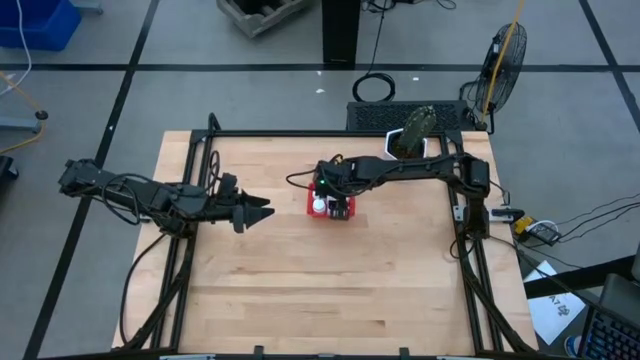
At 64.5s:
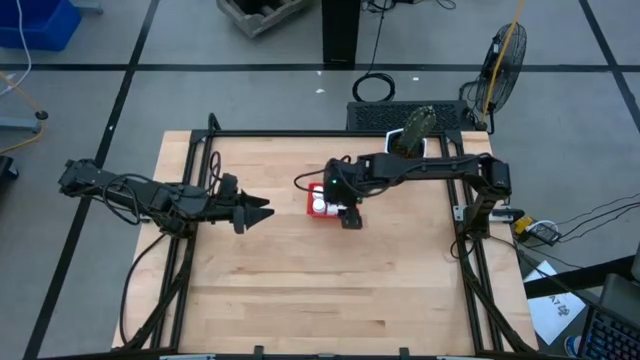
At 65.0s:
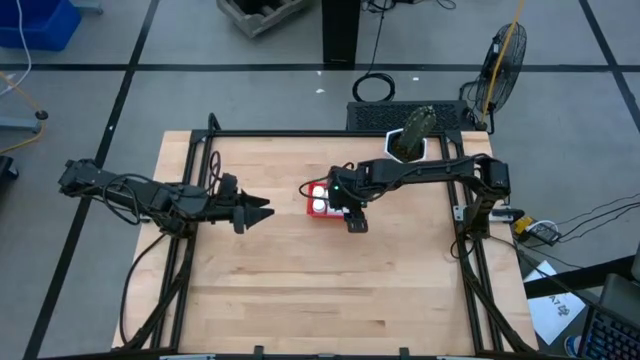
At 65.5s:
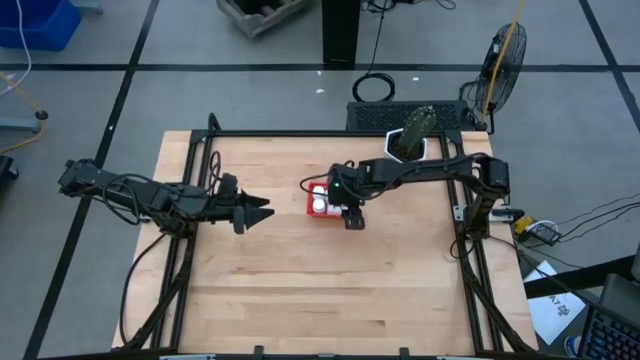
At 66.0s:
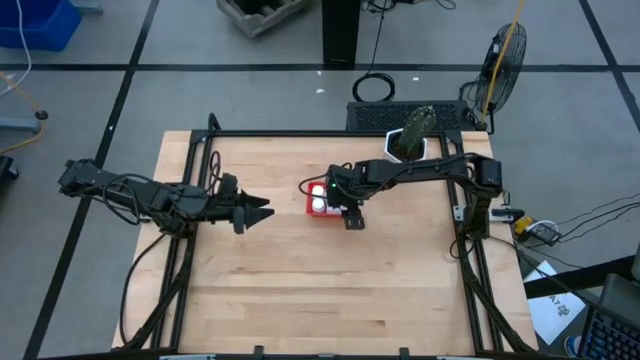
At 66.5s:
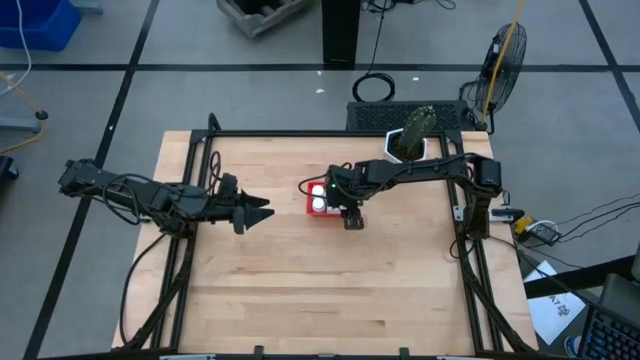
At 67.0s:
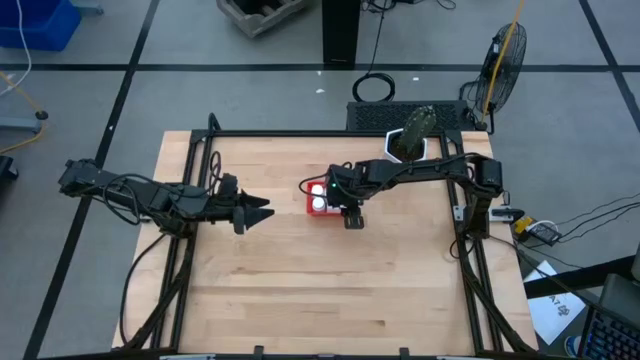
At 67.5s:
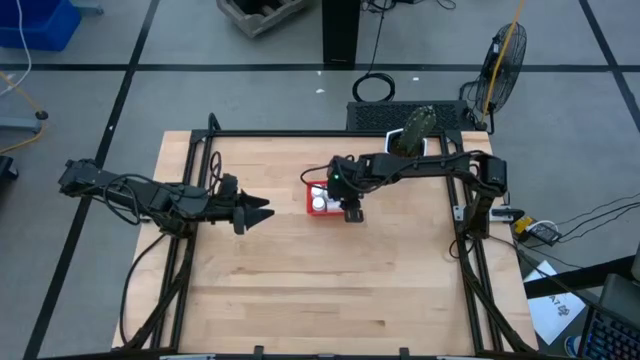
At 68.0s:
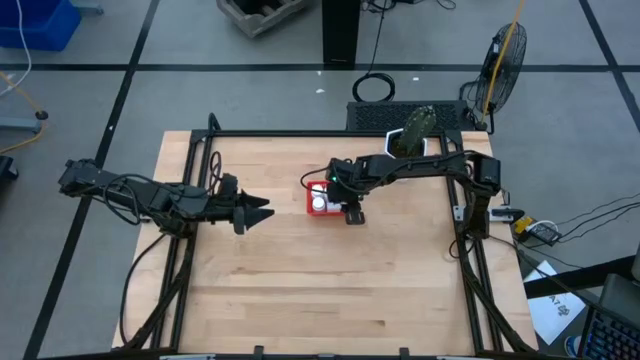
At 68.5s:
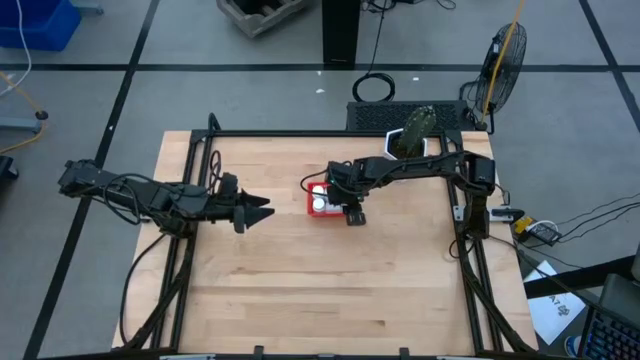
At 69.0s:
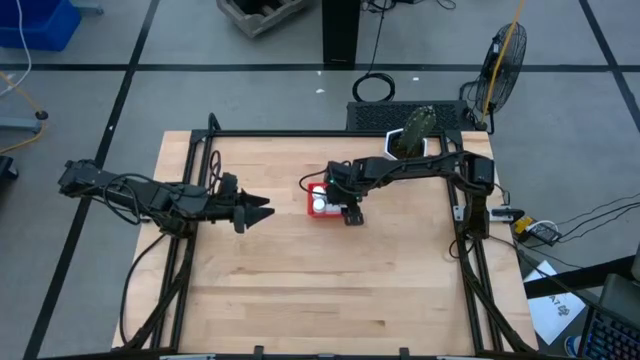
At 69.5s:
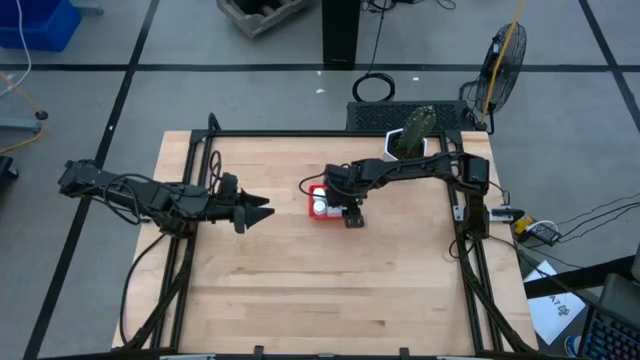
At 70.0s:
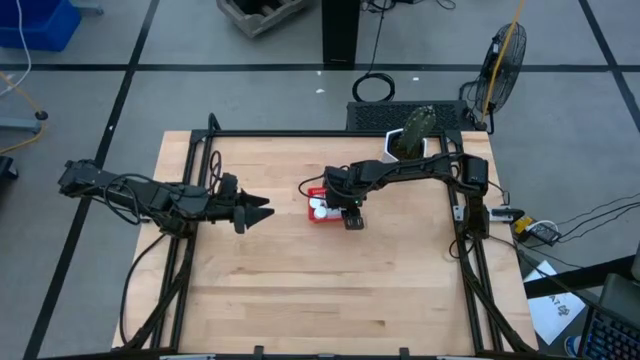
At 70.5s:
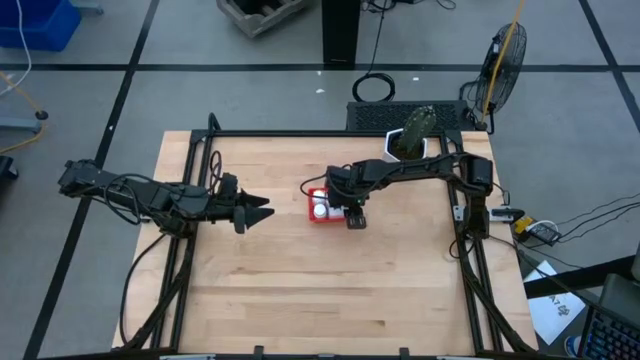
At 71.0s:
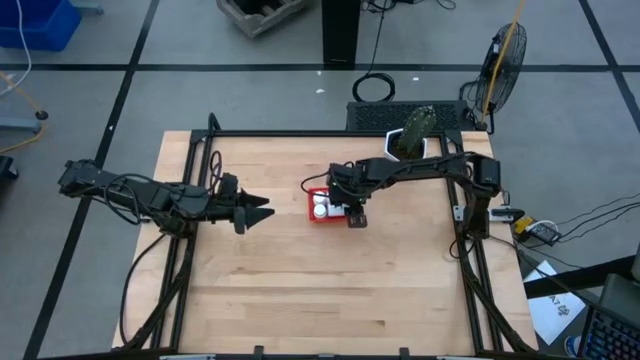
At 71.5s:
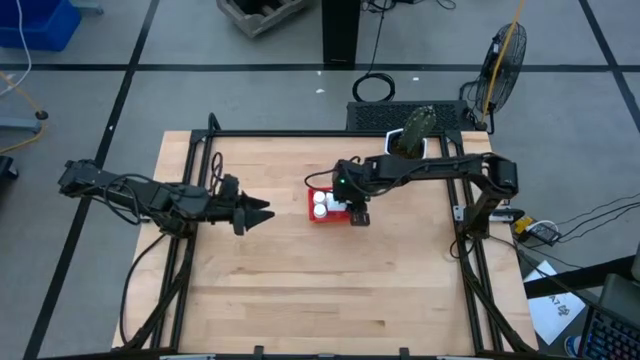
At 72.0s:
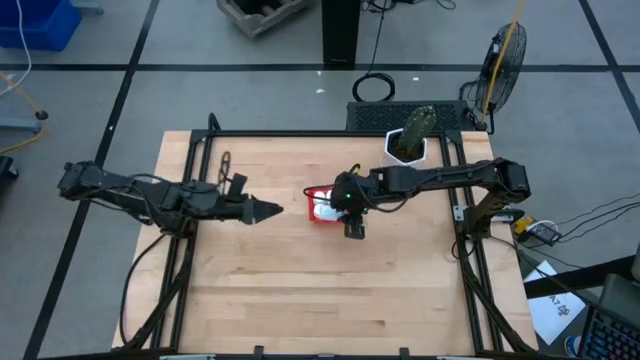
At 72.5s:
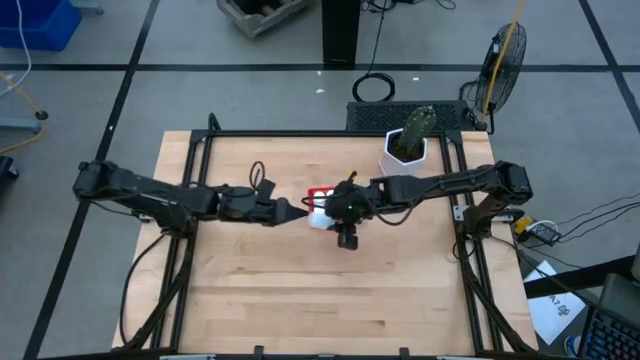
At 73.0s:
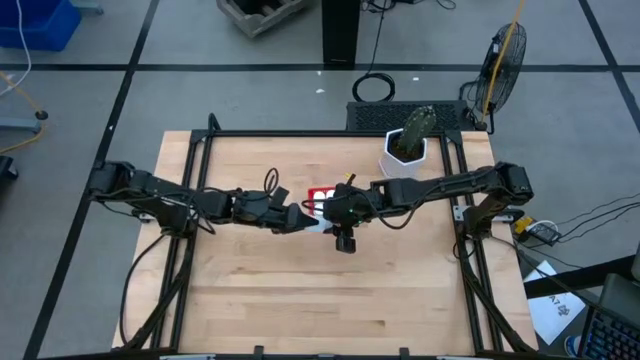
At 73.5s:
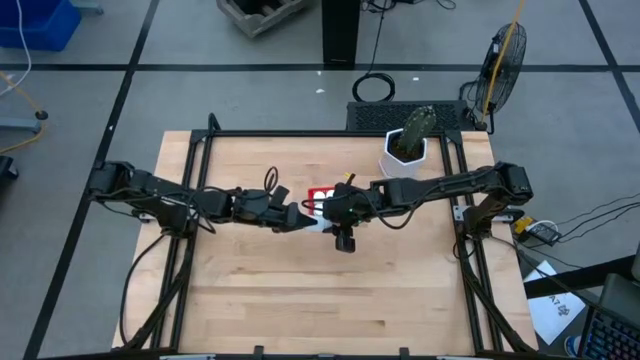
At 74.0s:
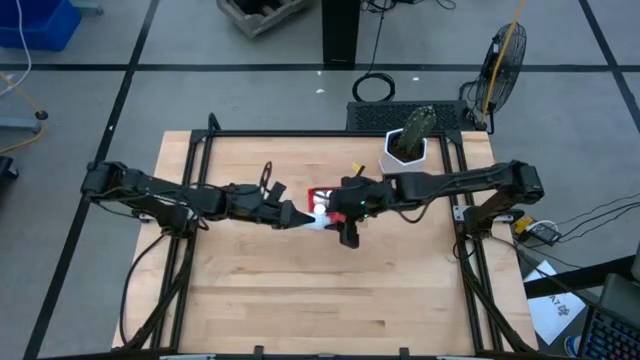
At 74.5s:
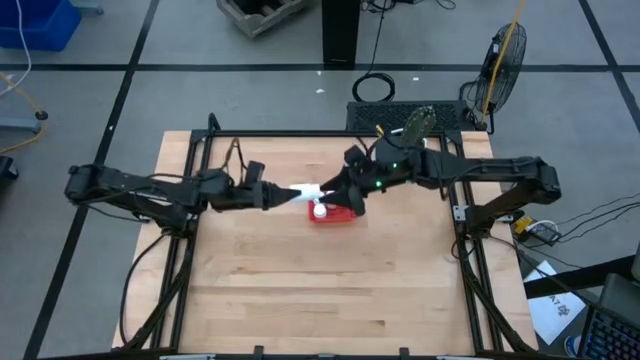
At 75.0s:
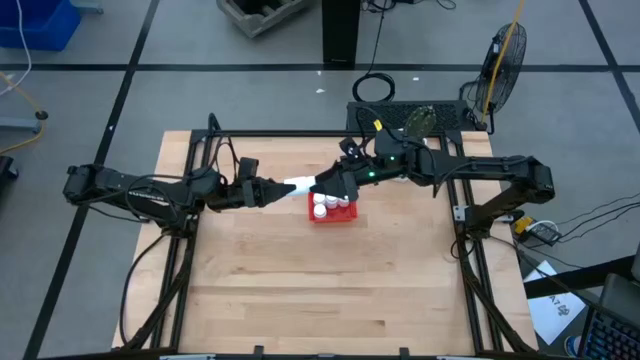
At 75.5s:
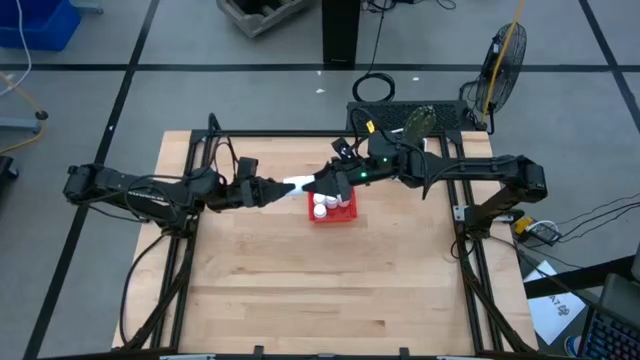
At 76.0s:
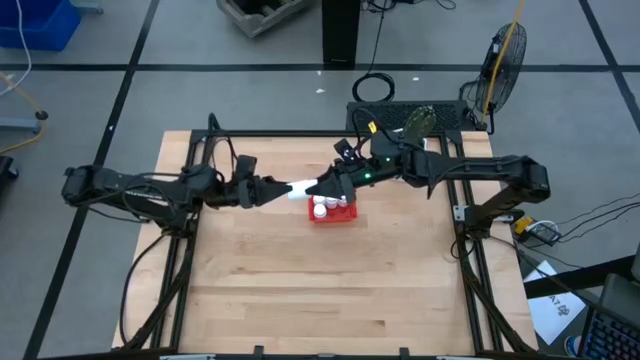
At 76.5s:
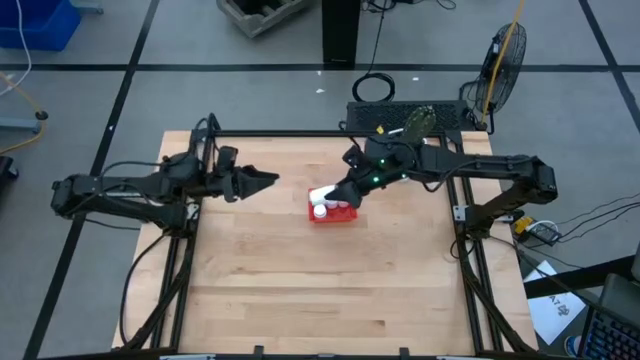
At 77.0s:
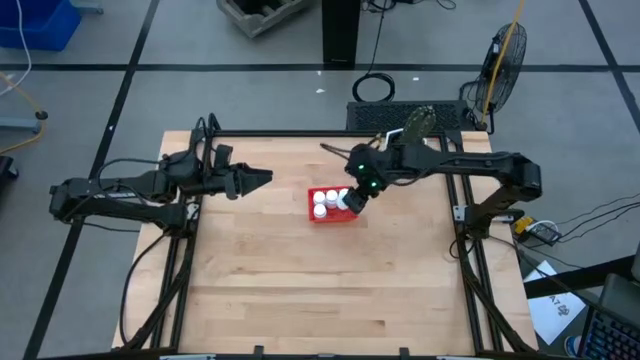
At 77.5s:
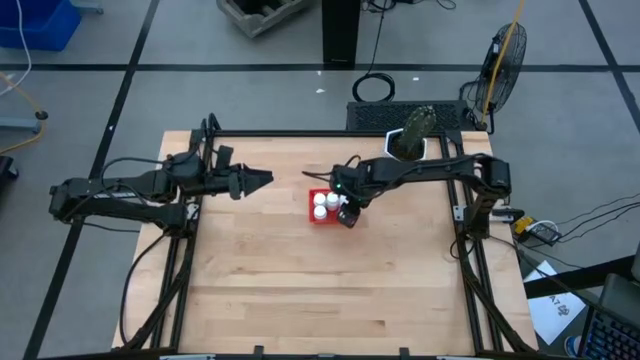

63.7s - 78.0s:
Task: Pick and place pill bottles into a basket
Adjust the white medicine bottle in the red basket

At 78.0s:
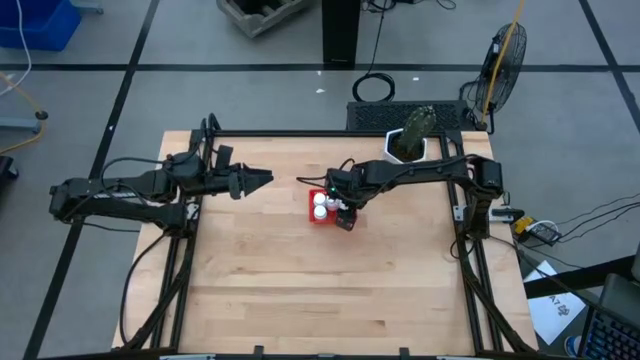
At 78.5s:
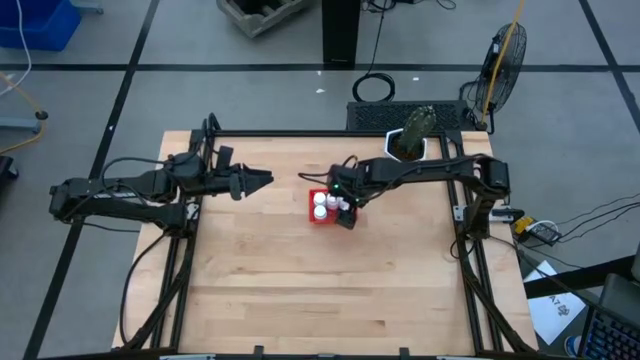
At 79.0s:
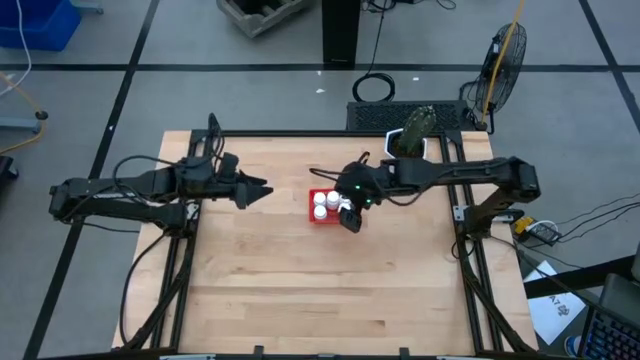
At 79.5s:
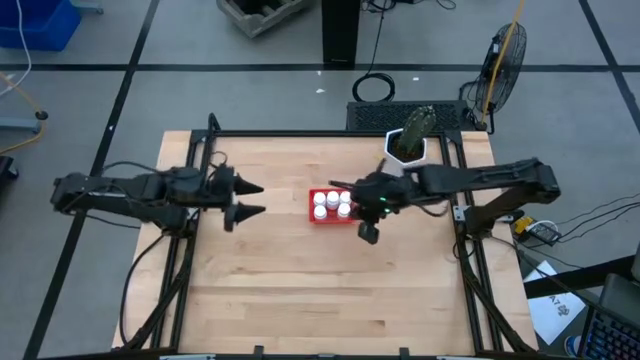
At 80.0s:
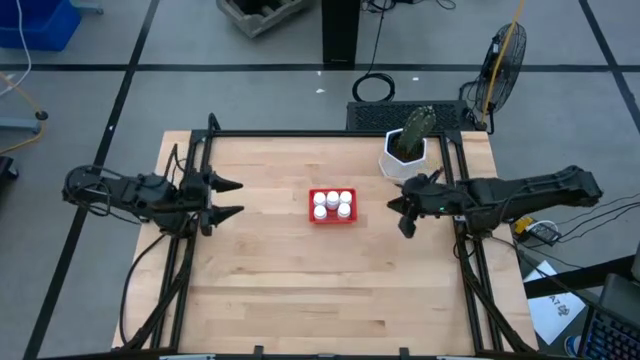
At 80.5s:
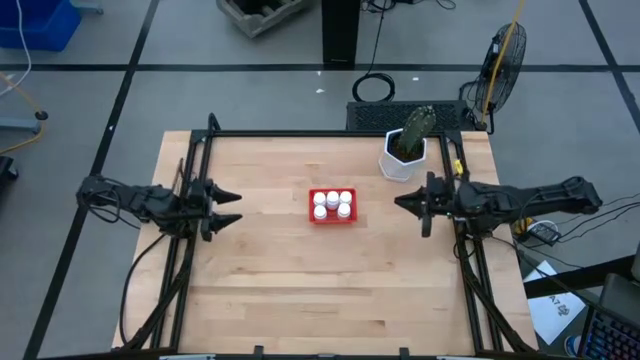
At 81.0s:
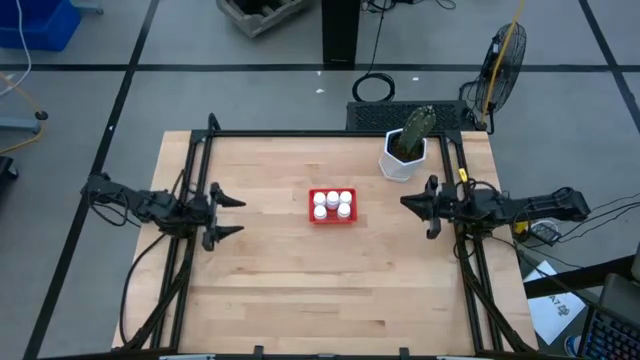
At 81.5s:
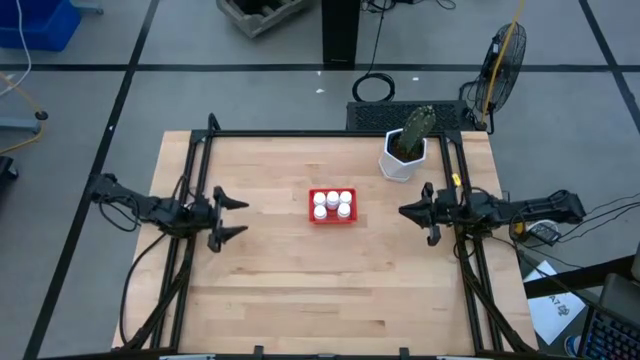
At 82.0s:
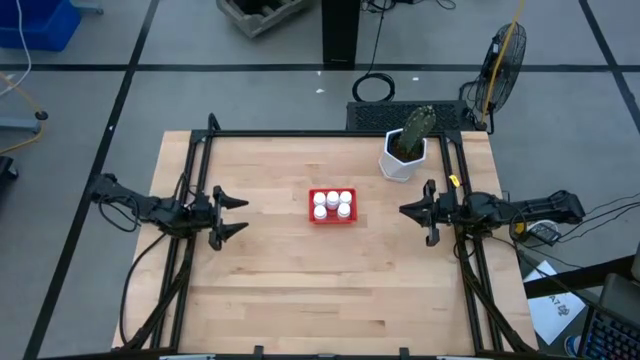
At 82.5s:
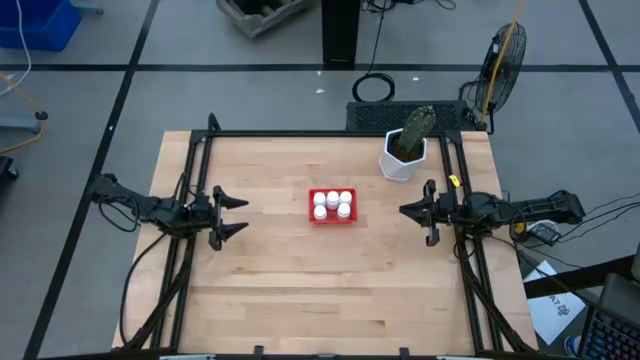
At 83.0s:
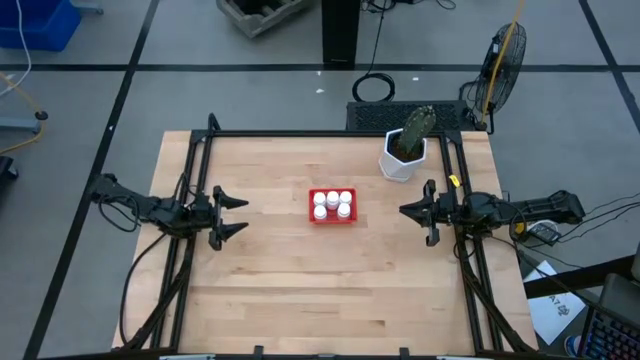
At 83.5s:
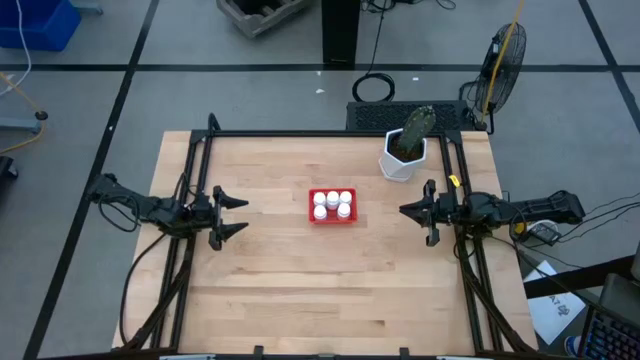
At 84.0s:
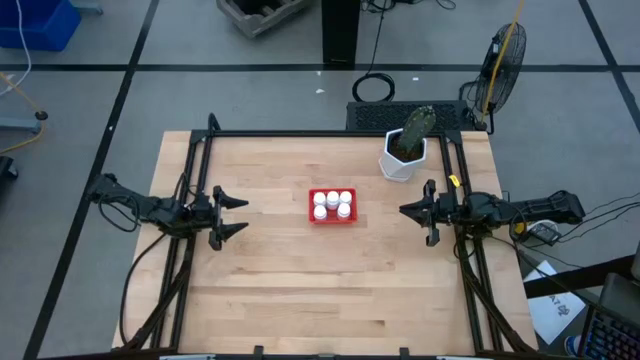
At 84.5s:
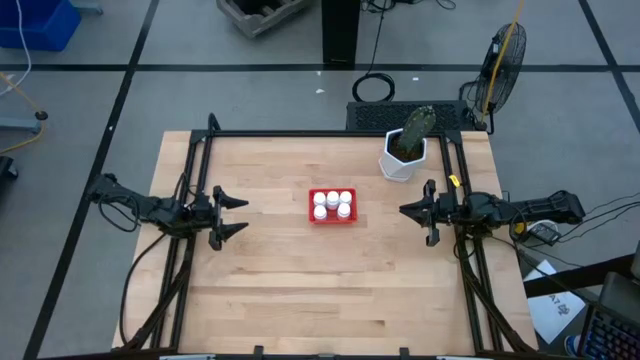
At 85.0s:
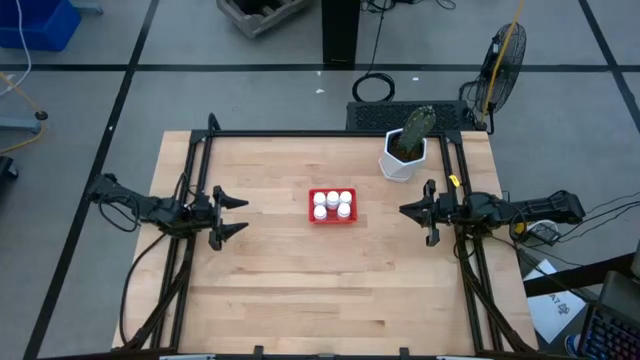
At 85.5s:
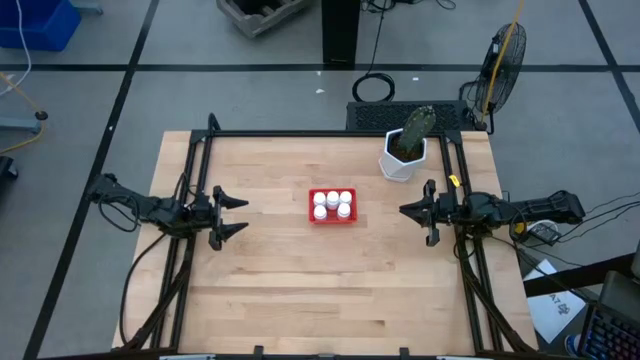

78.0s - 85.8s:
Return to Home Position
